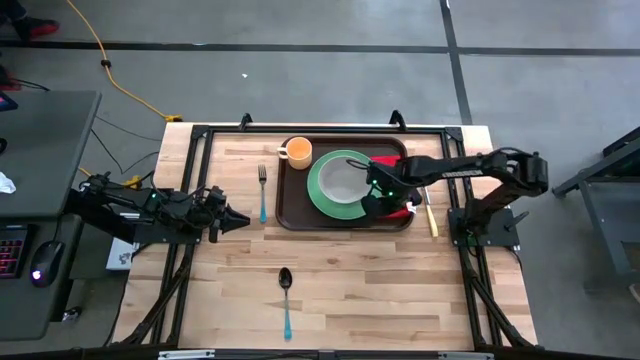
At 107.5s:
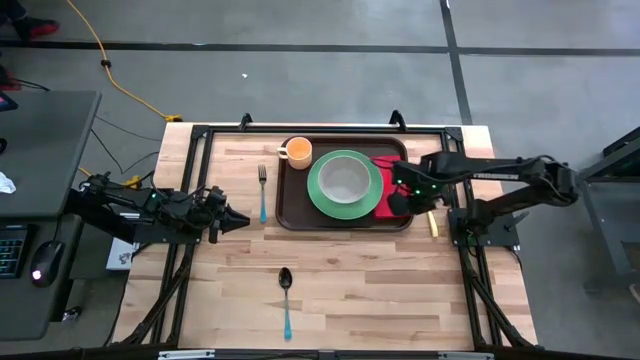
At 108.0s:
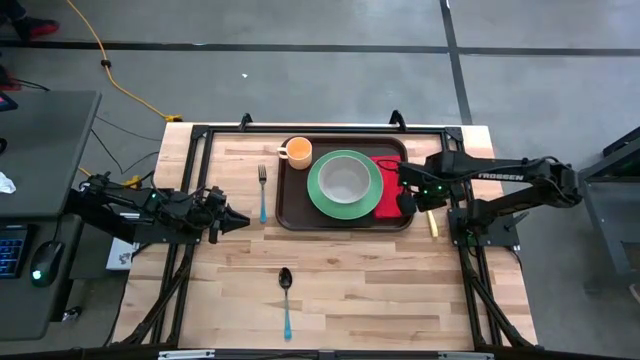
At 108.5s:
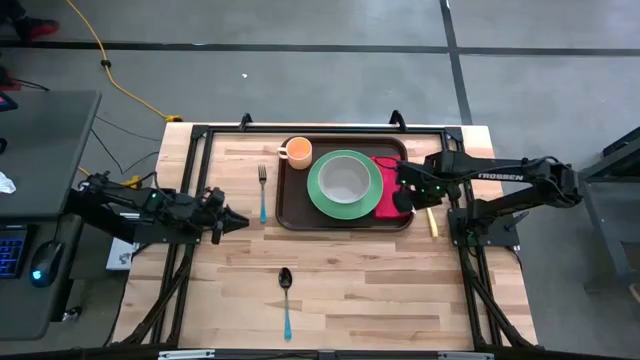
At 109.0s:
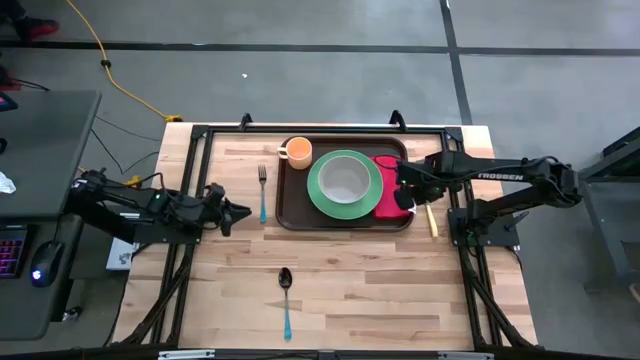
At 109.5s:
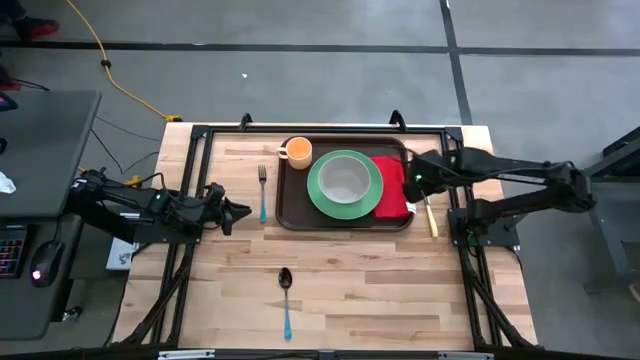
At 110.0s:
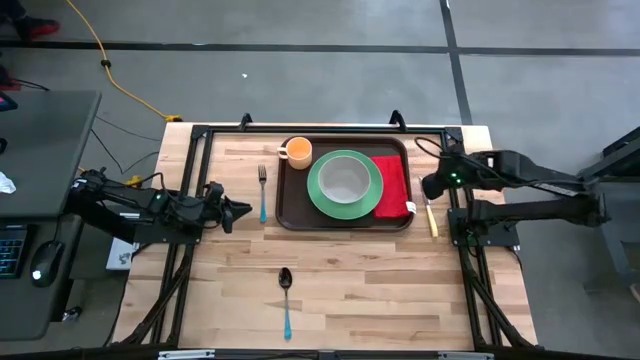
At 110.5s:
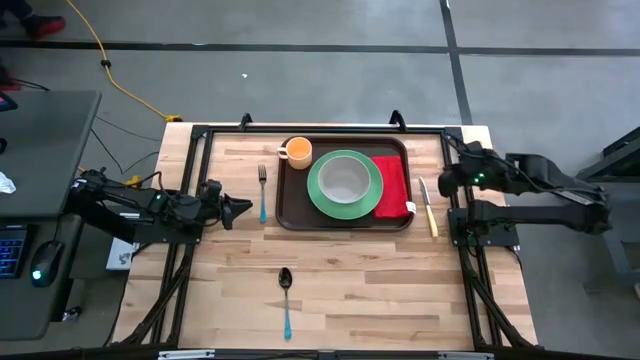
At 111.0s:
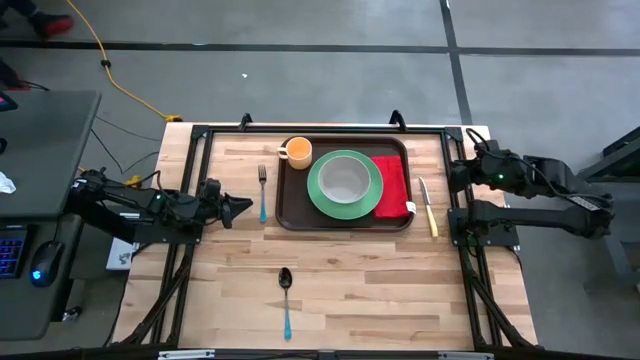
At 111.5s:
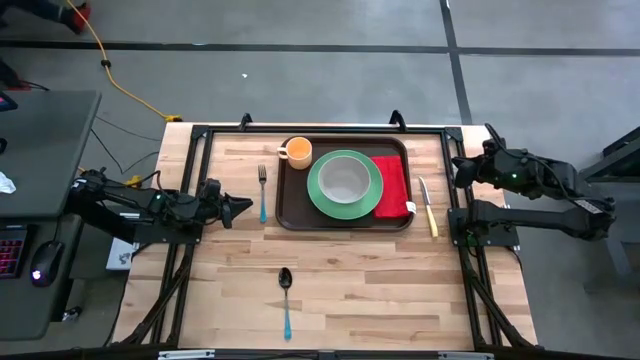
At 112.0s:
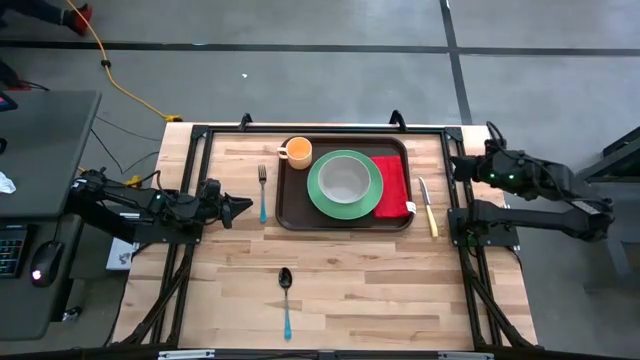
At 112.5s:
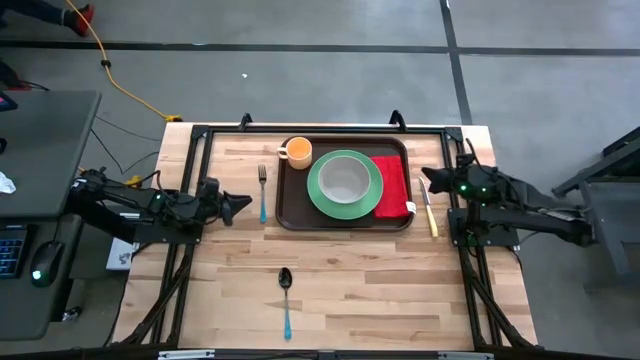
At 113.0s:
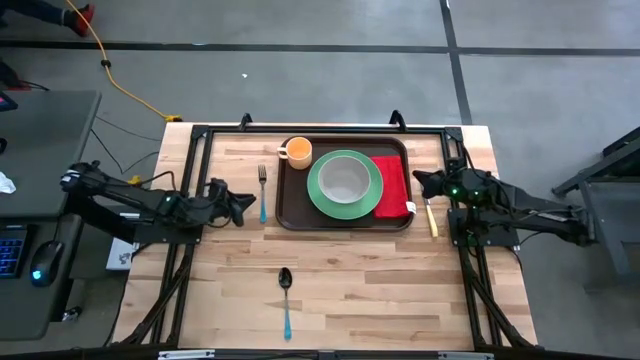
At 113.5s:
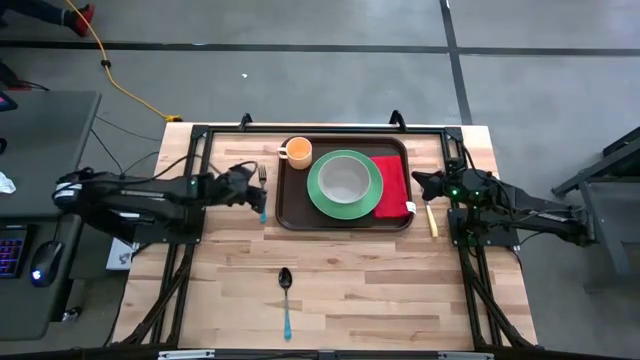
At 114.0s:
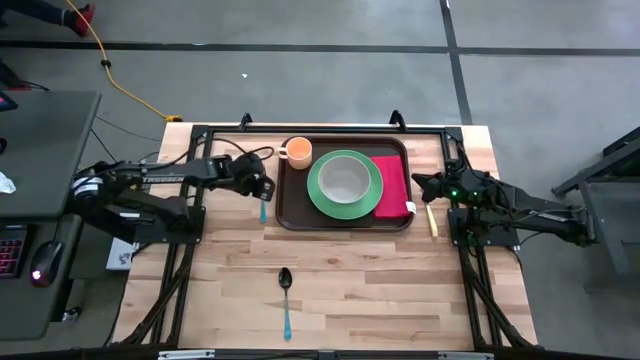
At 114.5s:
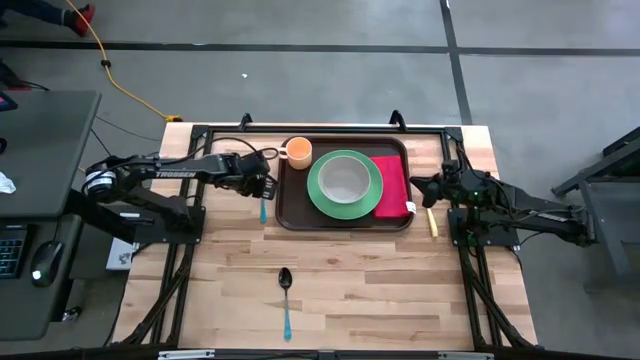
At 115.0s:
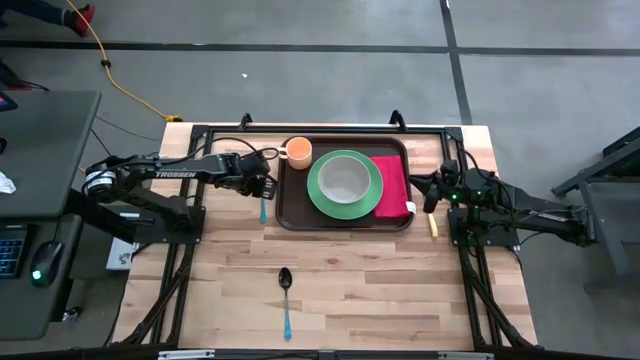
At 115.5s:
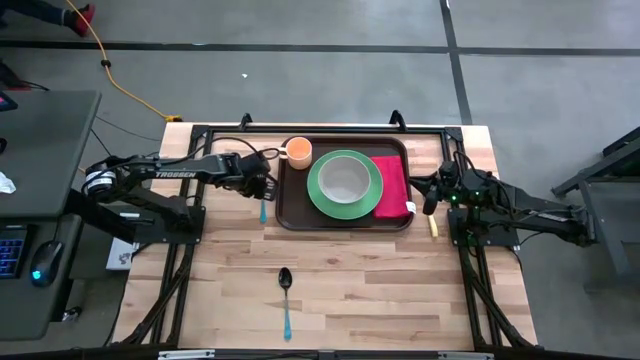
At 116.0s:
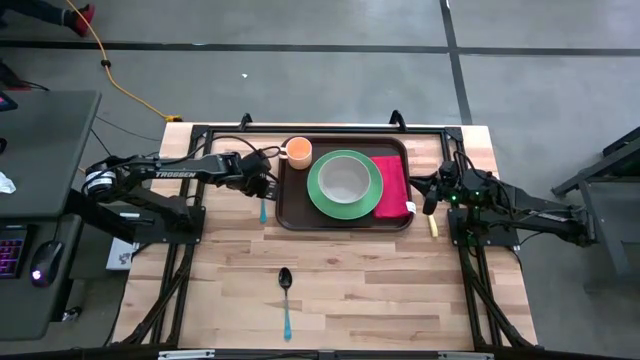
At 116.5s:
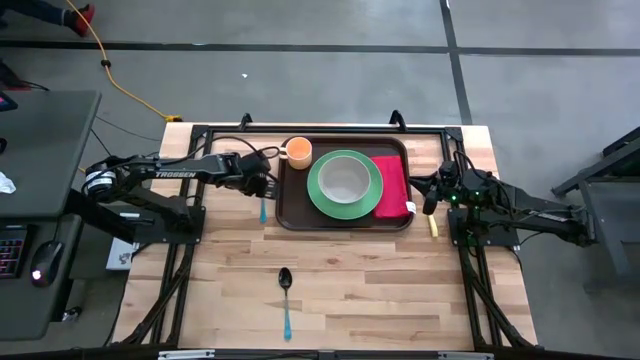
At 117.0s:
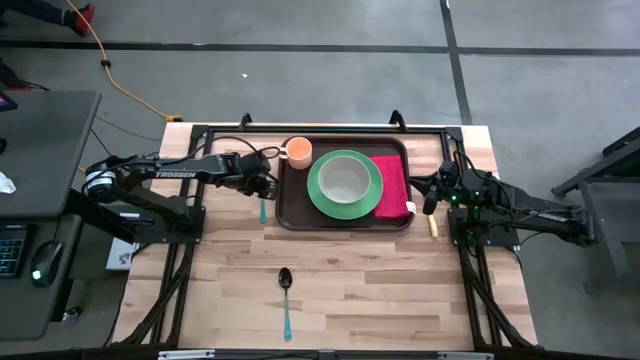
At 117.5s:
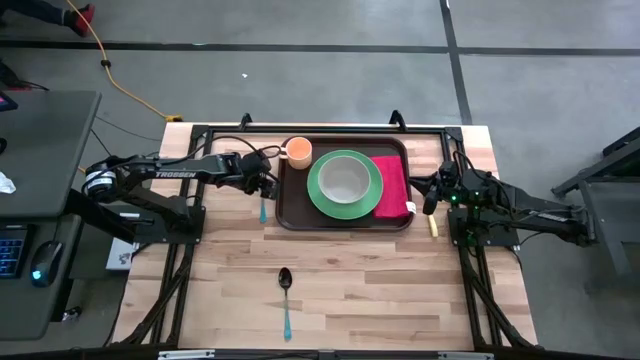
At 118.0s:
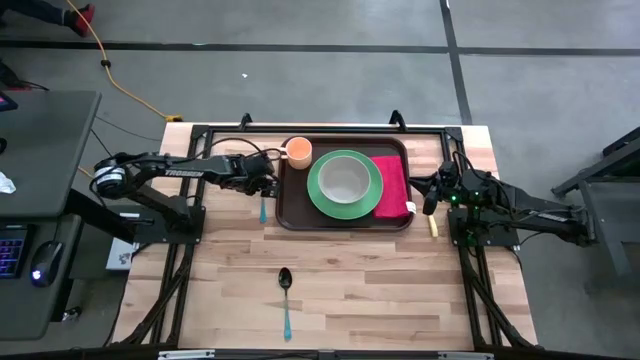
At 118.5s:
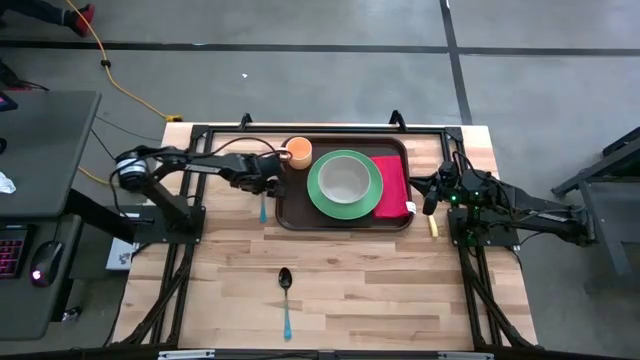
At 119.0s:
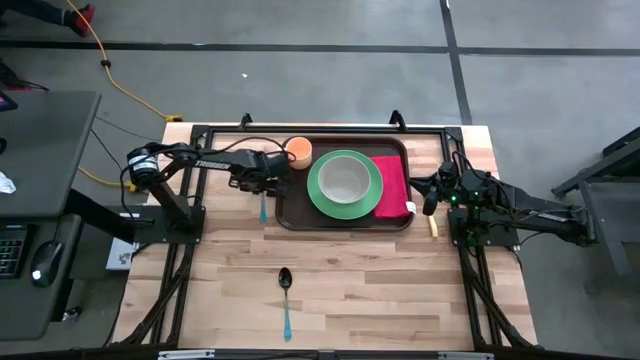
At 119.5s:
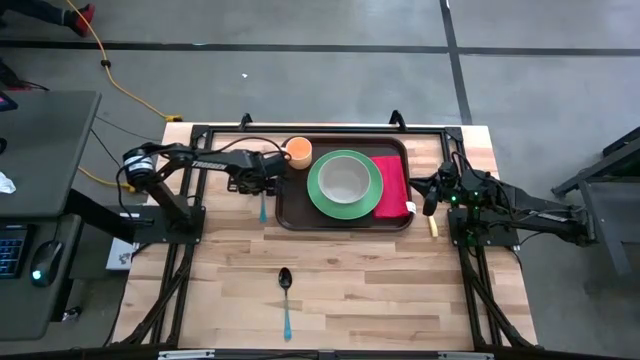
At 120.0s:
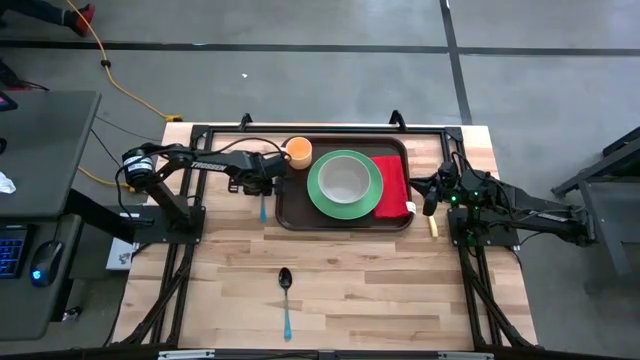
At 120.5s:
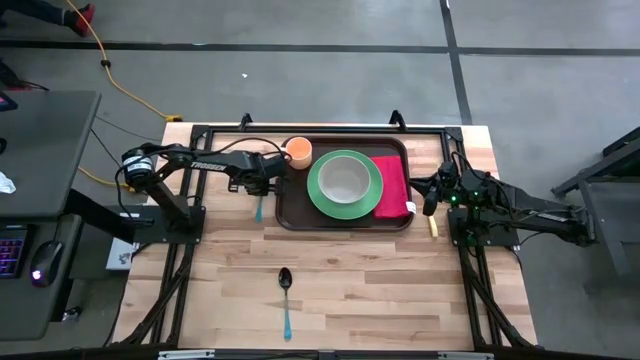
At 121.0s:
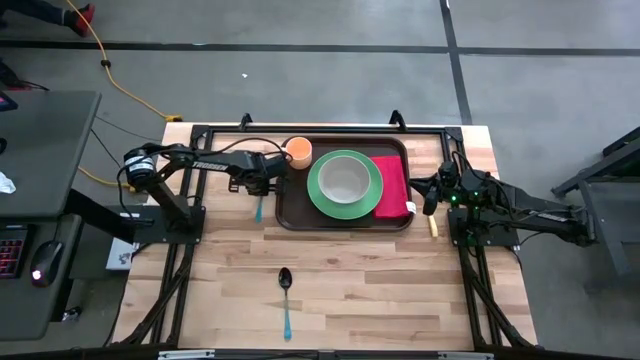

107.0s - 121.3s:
Task: Set up tray
Put the blue fork on top of the red table napkin on the brown tray

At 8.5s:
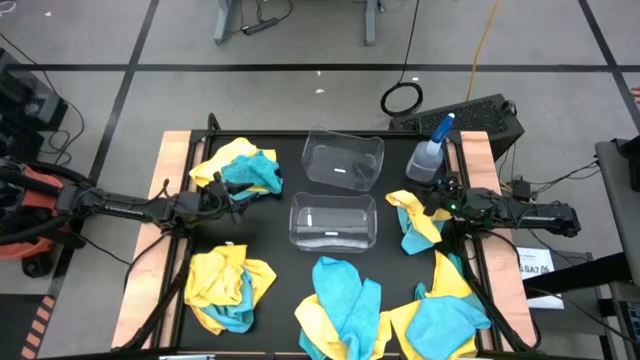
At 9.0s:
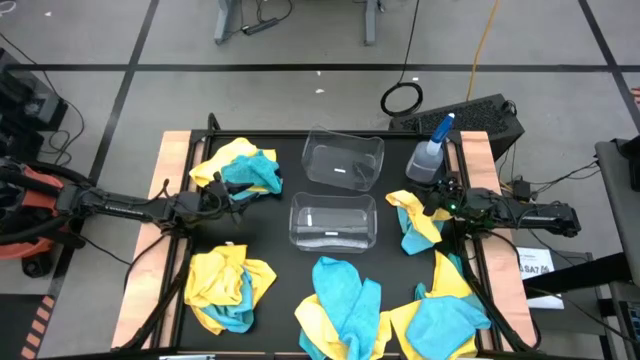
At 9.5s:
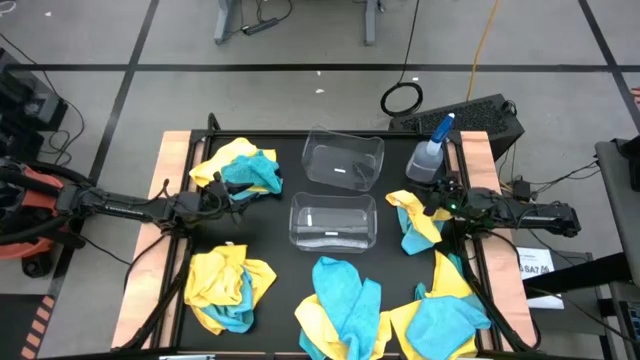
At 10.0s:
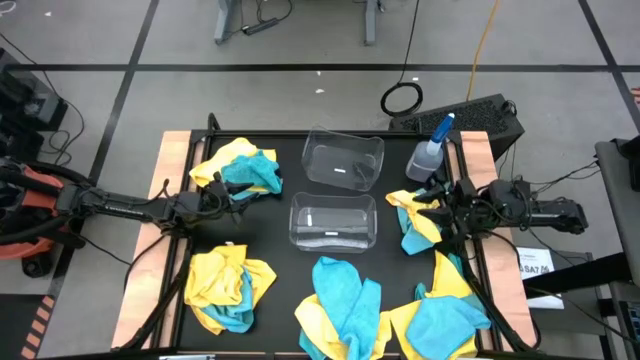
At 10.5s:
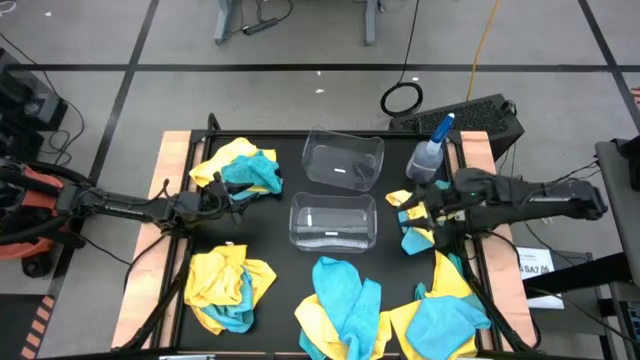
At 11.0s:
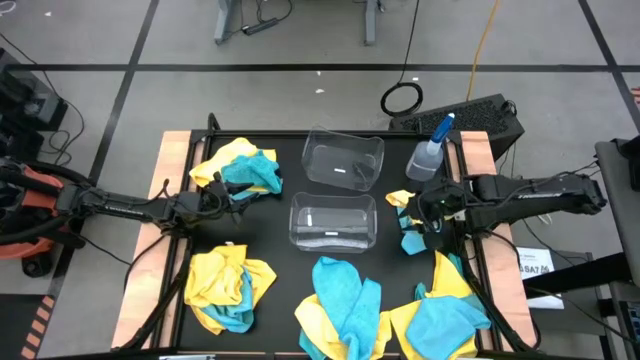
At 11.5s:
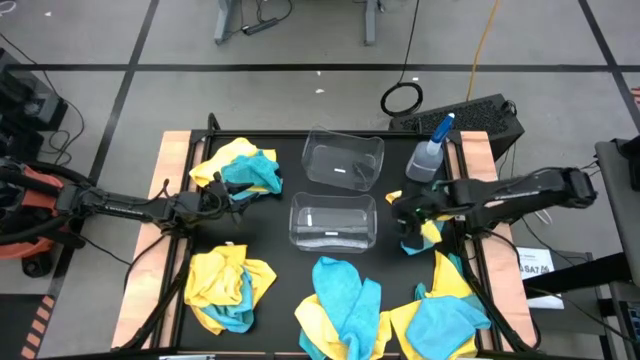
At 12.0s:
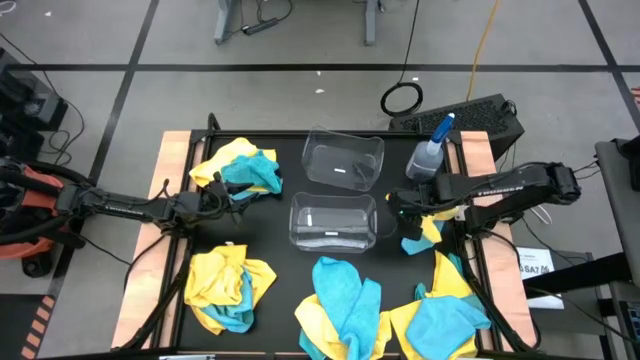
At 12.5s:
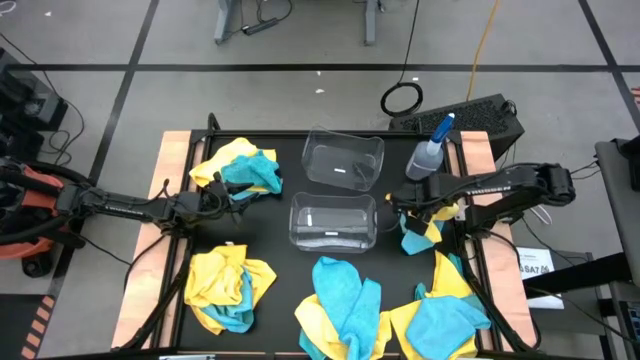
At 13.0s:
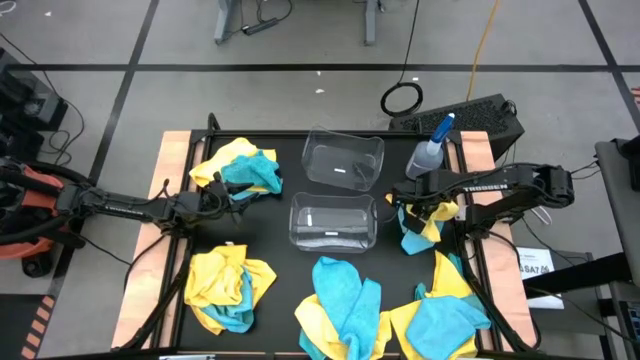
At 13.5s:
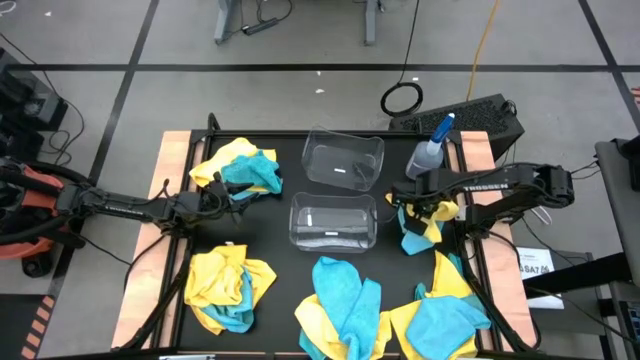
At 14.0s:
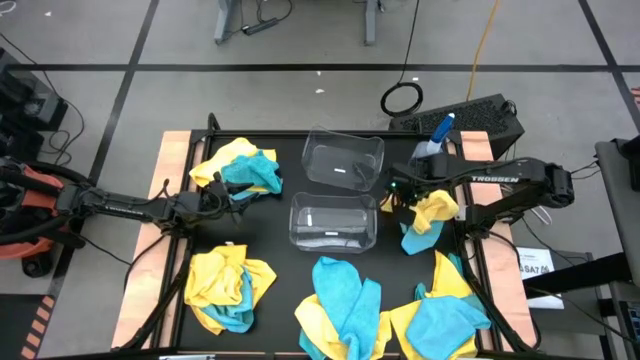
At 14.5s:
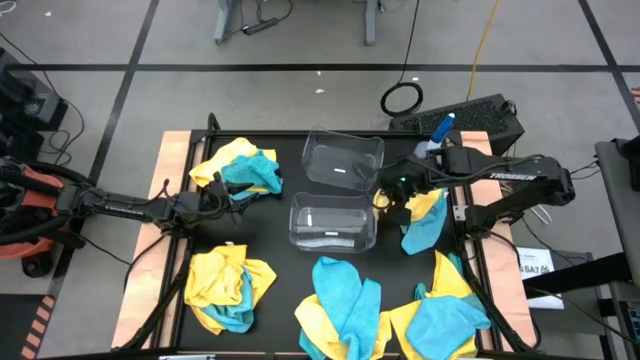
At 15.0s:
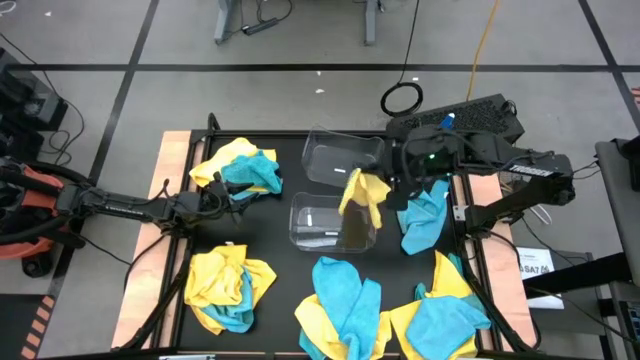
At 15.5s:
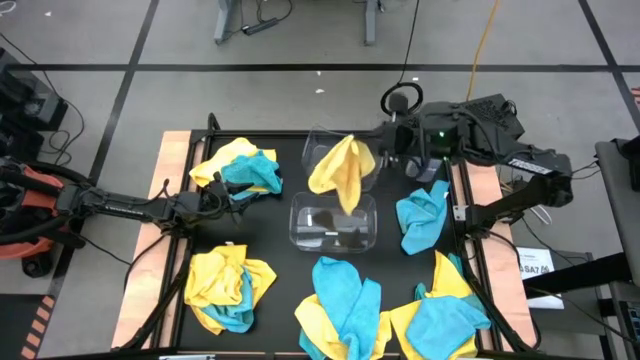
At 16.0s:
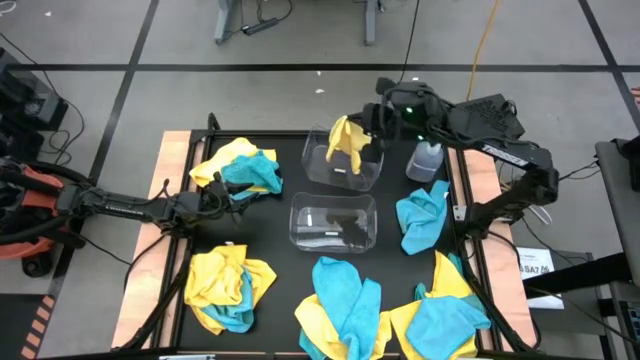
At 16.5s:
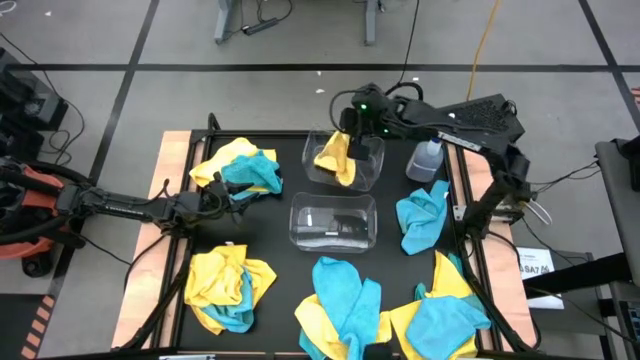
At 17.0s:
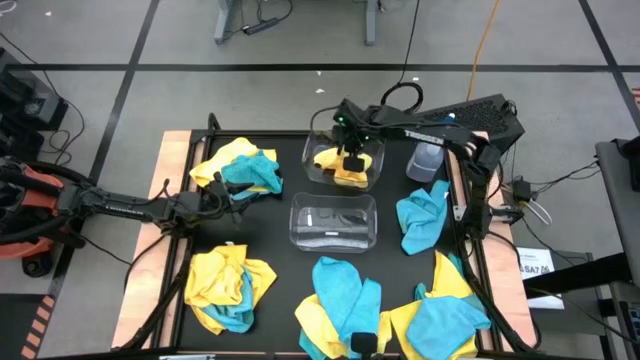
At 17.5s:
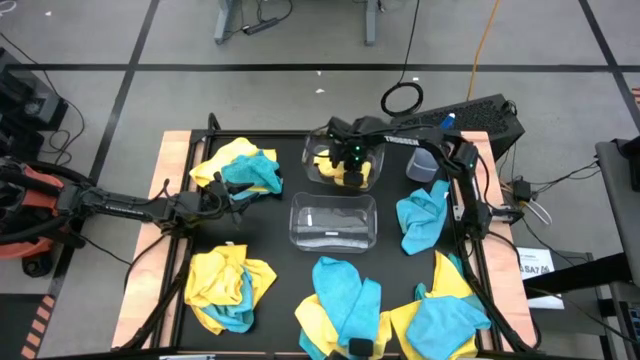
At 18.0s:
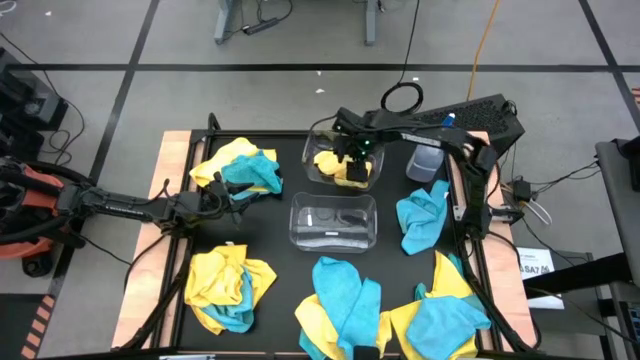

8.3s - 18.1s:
Task: Sort microfiber towel by color & place in baskets
Put the yellow microfiber cloth into the top transparent bin
